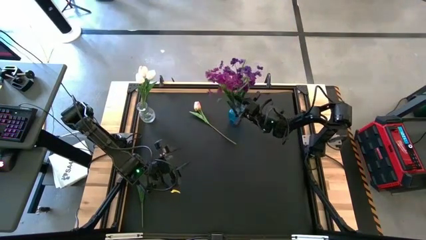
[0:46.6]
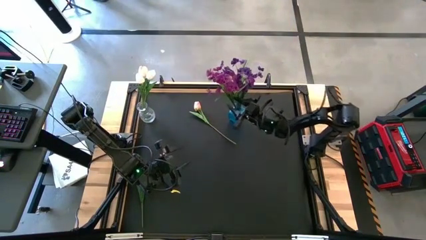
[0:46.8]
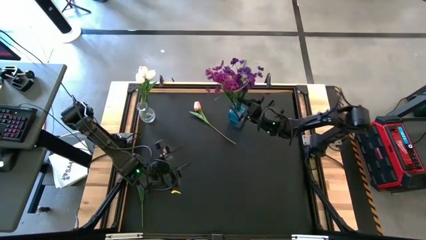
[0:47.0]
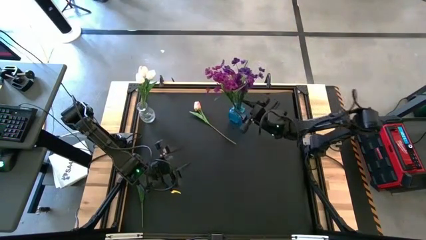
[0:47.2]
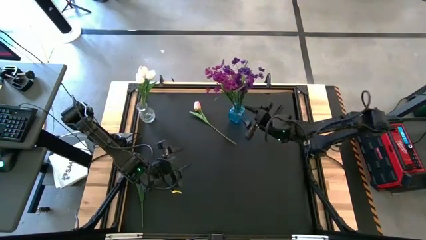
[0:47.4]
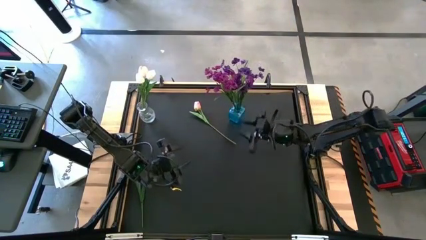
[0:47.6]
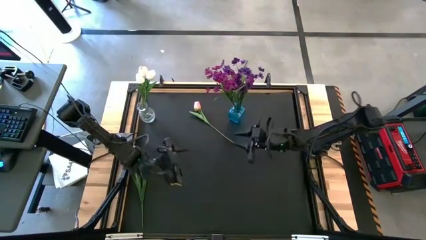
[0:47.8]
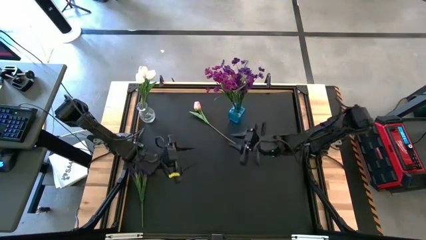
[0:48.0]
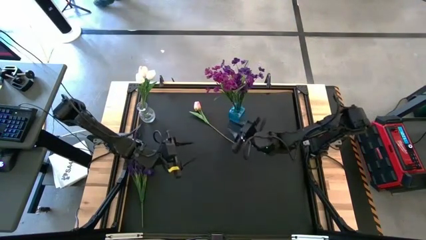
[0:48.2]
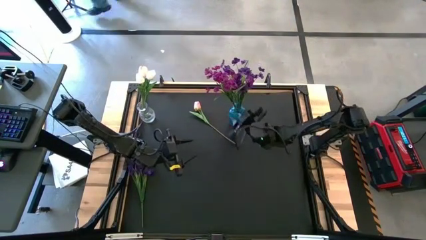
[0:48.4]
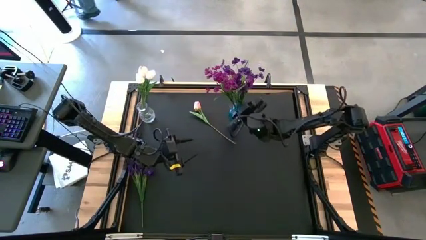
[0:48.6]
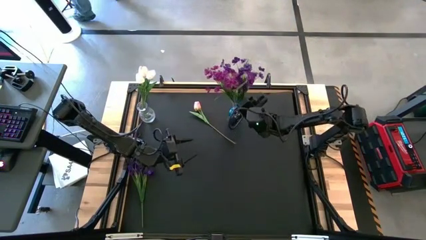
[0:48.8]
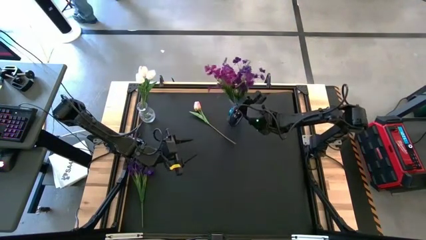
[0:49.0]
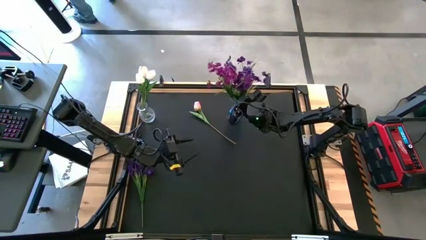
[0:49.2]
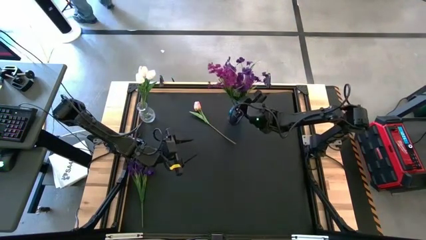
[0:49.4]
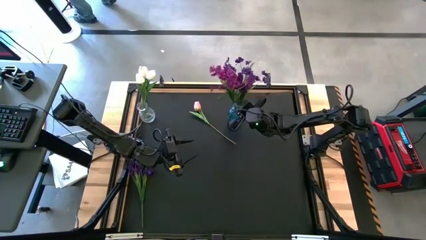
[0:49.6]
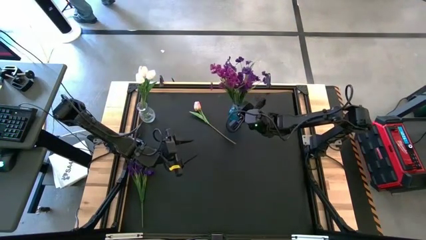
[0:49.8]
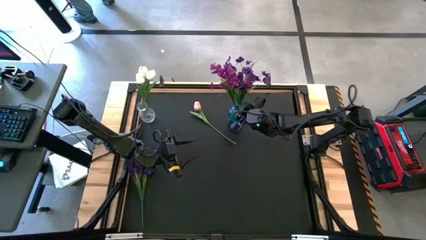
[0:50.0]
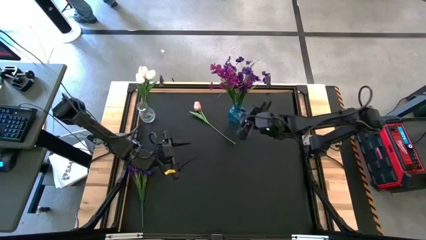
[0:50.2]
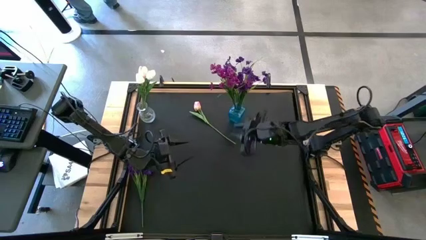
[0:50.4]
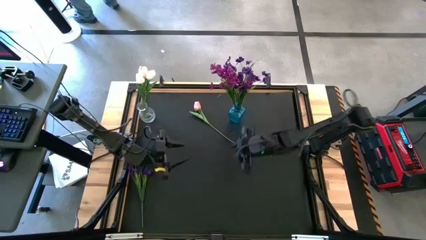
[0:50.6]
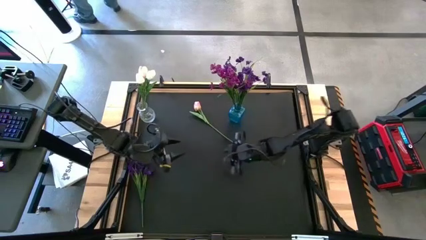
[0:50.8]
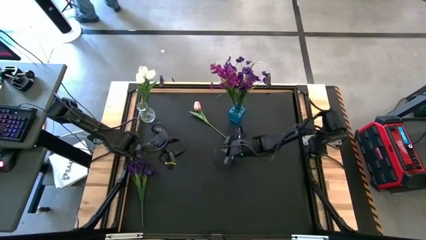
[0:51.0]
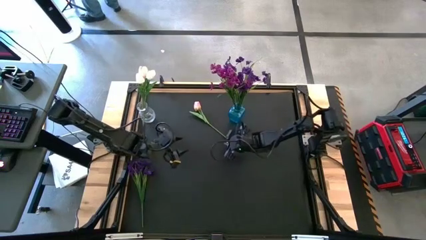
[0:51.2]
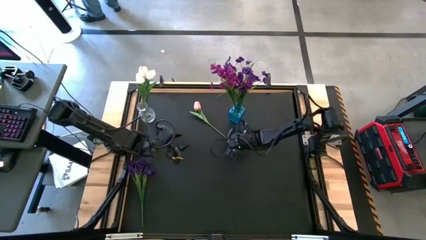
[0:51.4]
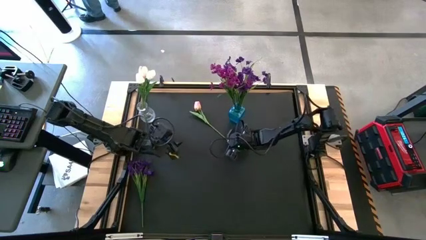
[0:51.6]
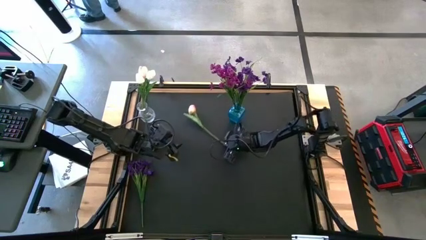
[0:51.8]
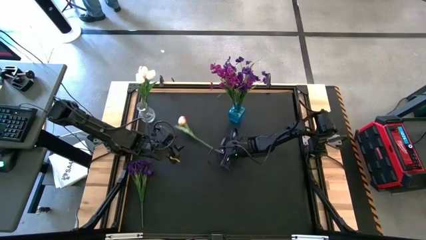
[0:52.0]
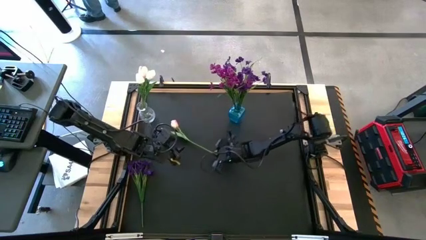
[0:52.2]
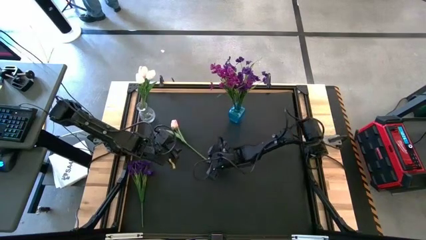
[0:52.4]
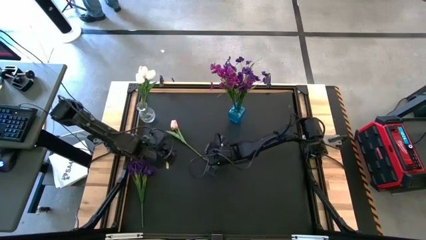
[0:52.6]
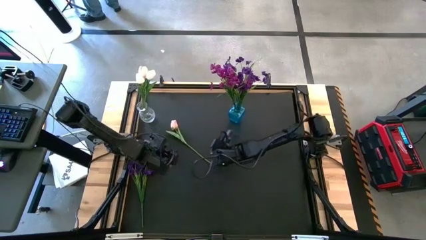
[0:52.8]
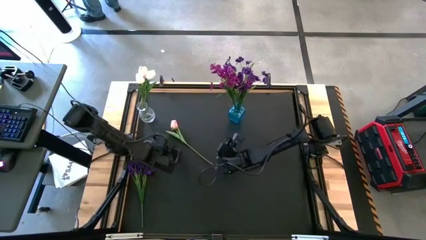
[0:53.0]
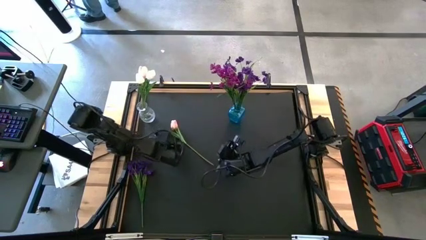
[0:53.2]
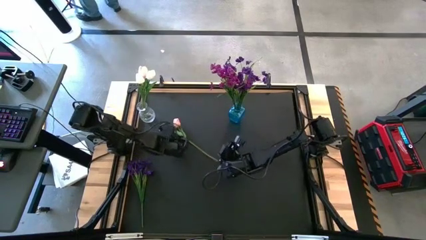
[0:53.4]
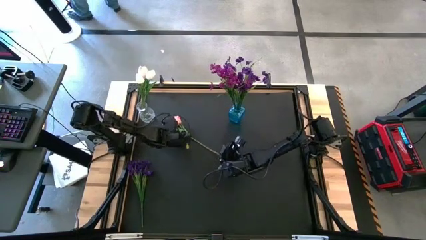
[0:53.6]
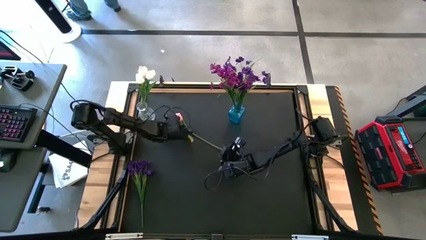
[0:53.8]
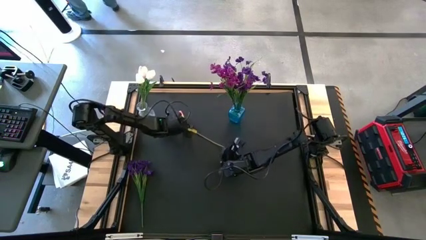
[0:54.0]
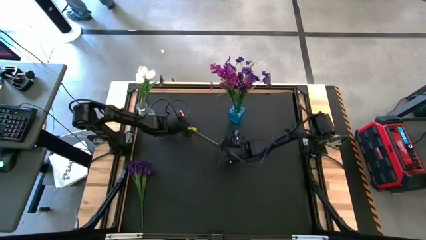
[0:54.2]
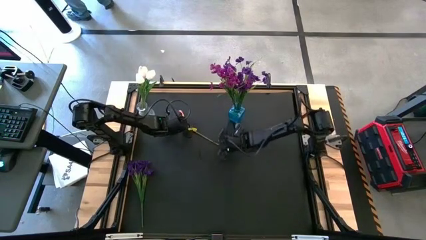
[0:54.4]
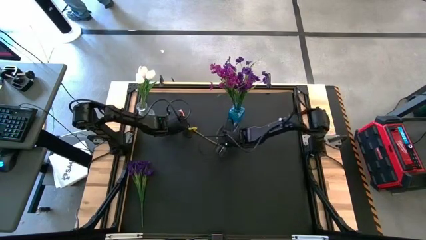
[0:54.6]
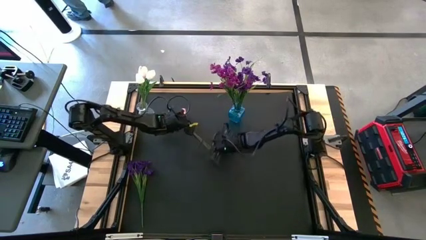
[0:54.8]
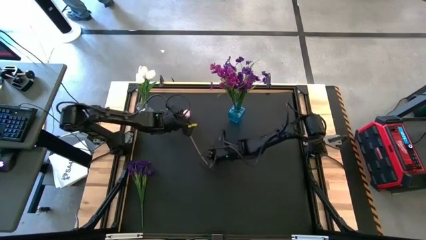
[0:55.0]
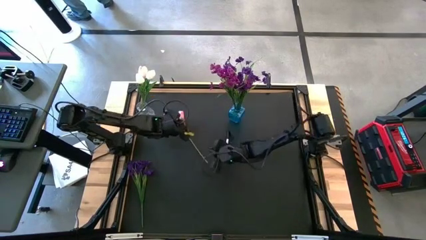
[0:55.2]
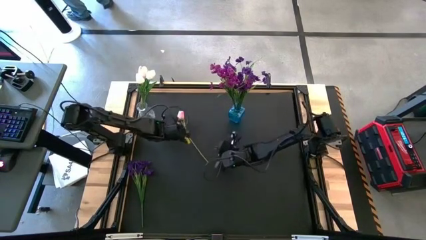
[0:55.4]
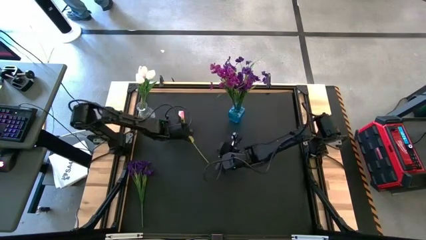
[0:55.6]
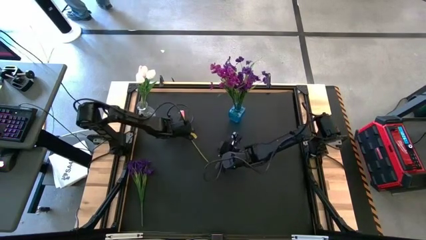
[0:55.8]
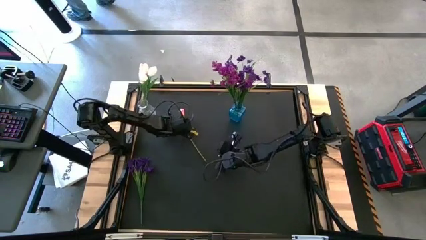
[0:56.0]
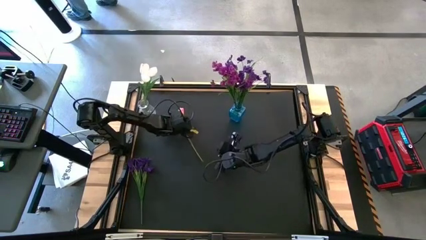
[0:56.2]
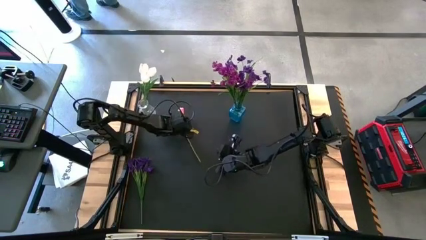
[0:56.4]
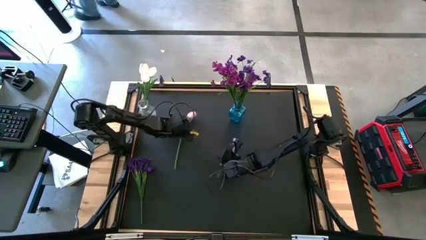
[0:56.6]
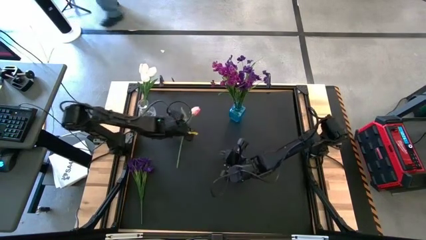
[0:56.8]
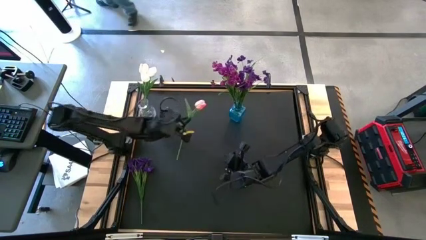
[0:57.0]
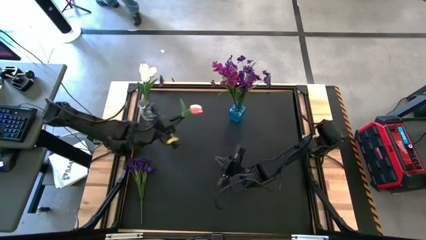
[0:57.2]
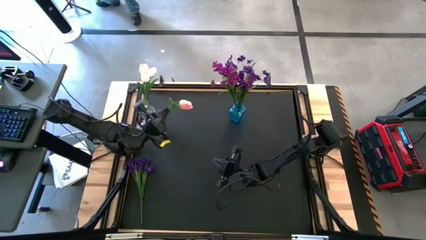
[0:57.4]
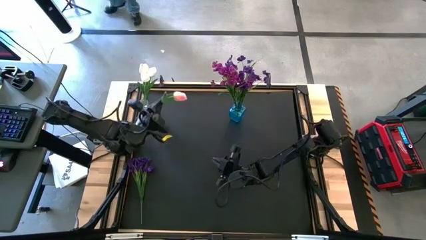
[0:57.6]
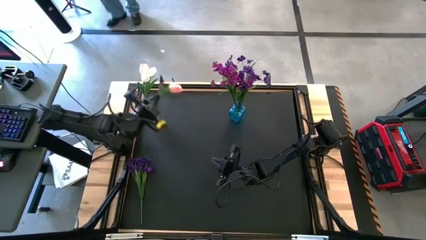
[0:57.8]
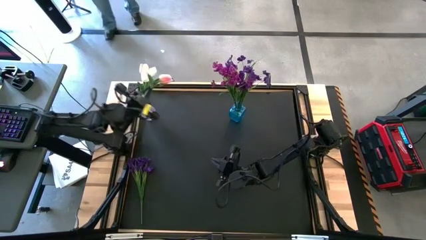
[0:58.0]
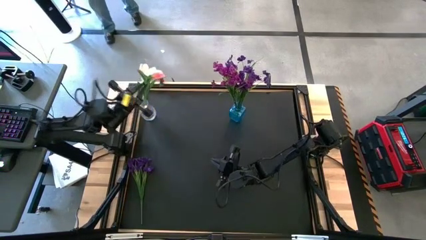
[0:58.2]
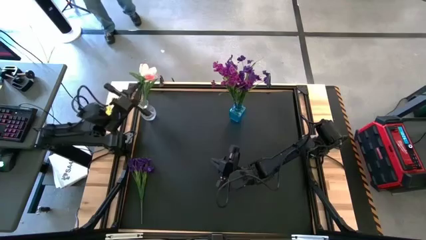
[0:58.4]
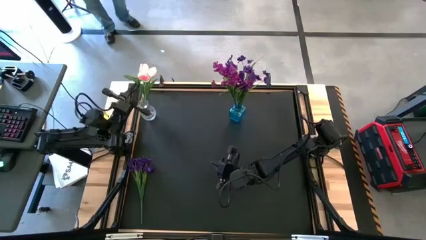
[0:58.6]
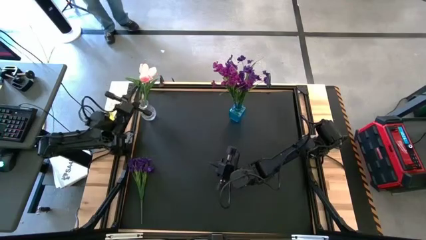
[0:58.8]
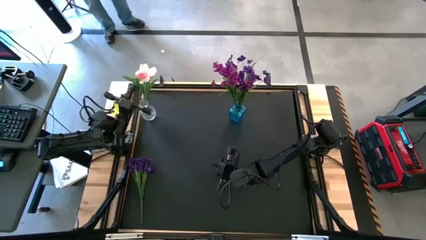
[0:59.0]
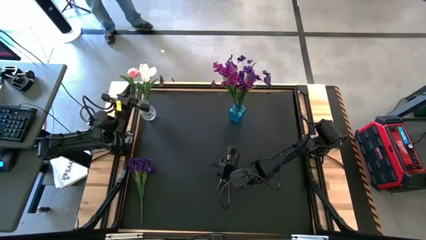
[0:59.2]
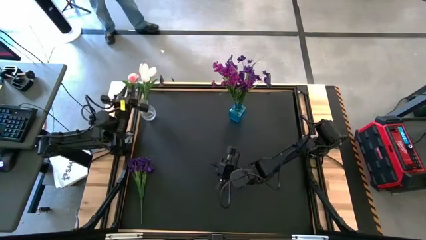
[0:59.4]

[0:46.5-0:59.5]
Task: Sort flowers into vase by color
Put the pink flower into the transparent vase

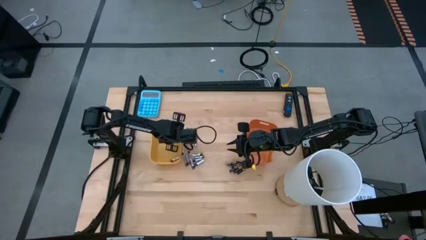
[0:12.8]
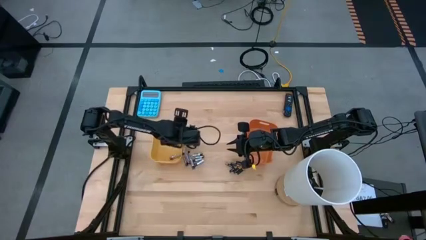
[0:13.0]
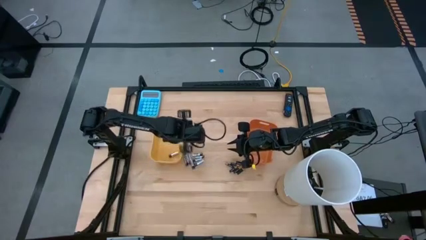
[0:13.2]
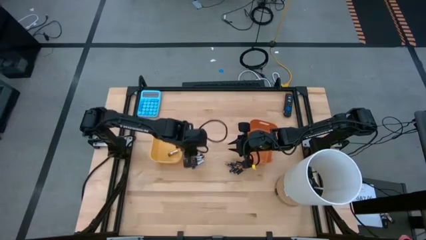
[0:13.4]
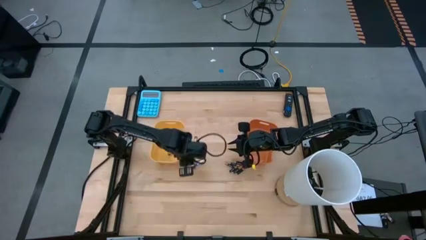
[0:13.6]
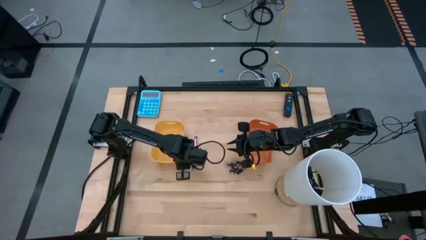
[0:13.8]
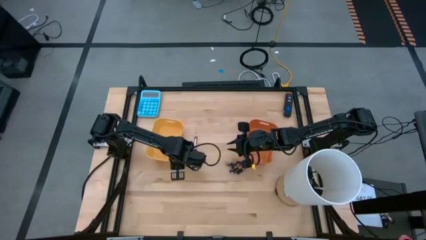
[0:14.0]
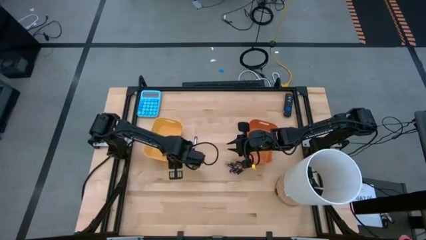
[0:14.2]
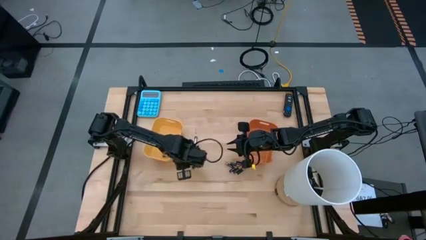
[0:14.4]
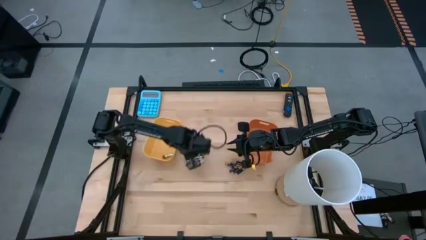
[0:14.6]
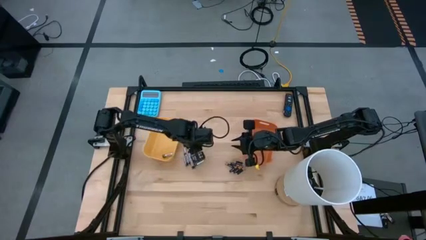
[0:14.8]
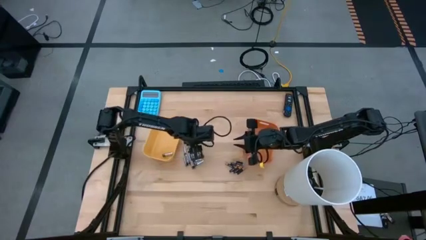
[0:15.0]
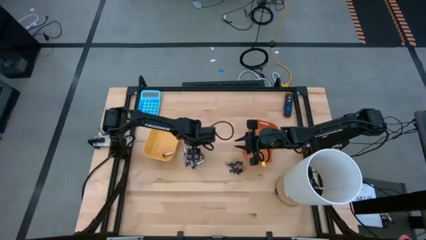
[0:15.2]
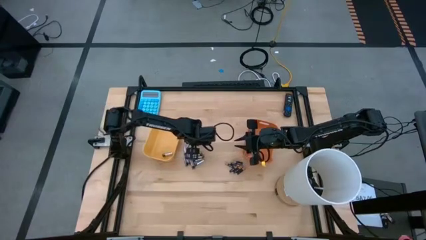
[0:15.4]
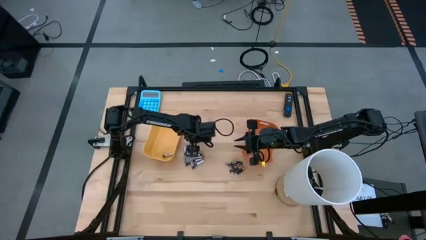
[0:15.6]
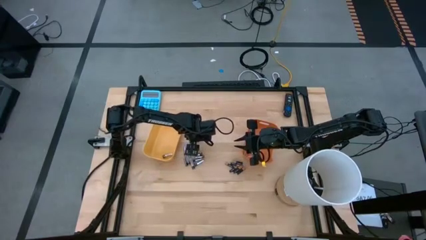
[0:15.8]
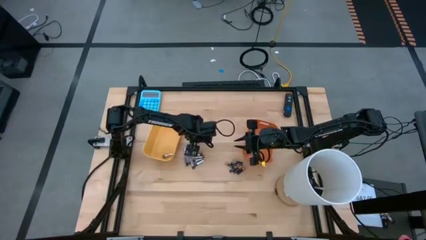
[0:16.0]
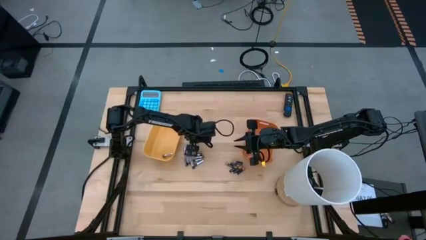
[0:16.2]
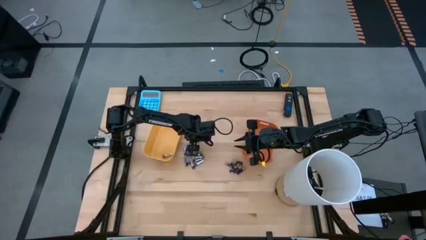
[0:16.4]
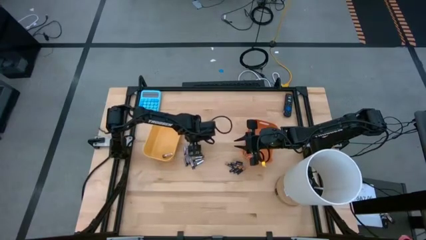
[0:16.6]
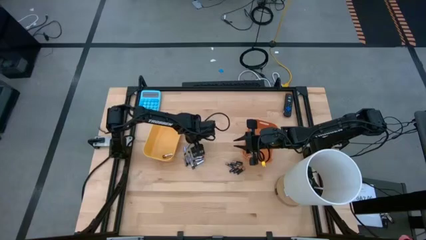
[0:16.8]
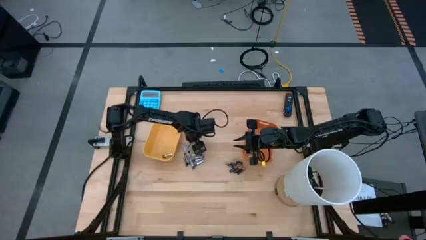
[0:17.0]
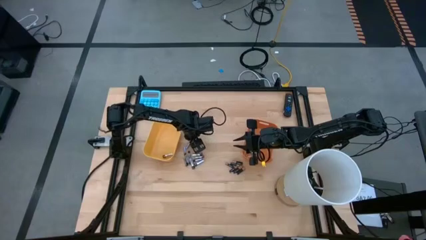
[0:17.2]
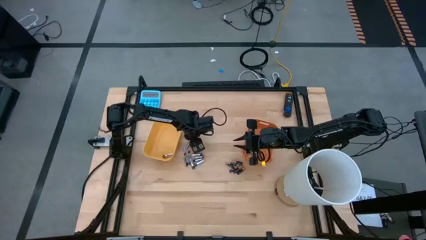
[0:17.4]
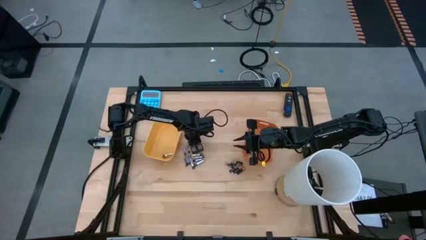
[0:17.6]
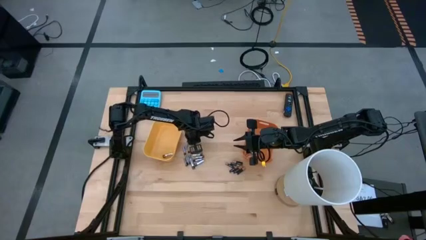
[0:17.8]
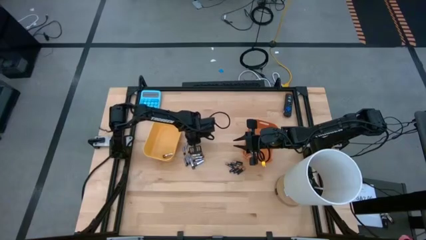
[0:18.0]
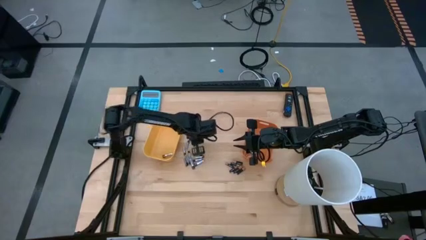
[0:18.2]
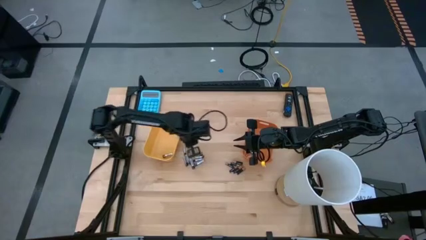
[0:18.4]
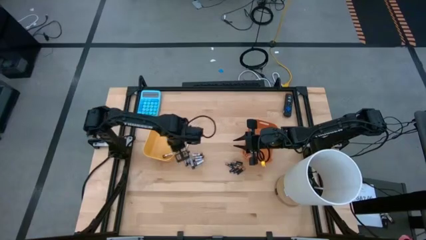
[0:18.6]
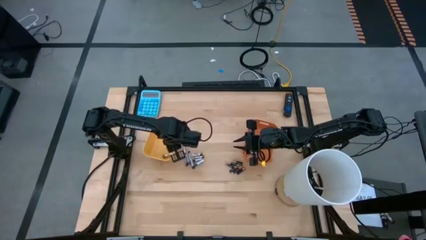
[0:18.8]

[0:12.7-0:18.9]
Task: Sort batteries
Put the silver battery into the yellow bin
